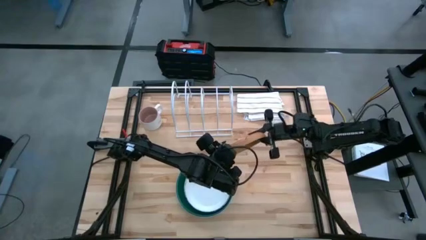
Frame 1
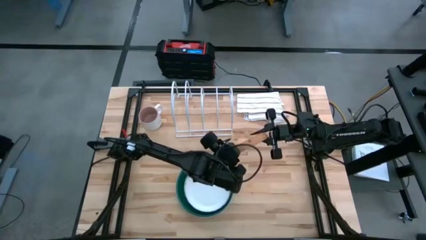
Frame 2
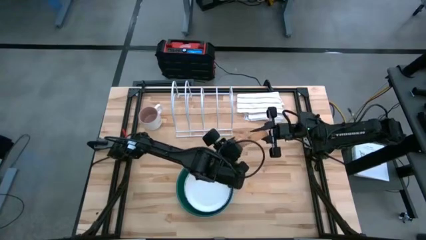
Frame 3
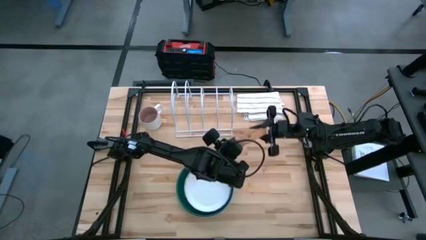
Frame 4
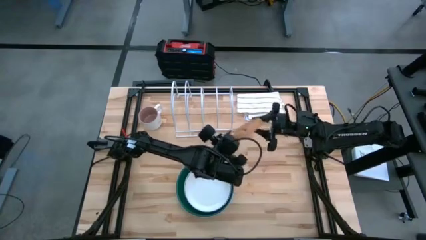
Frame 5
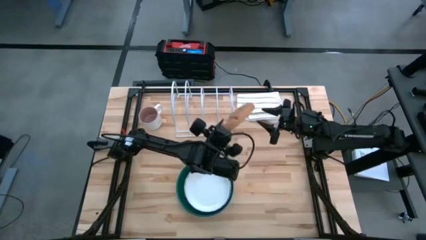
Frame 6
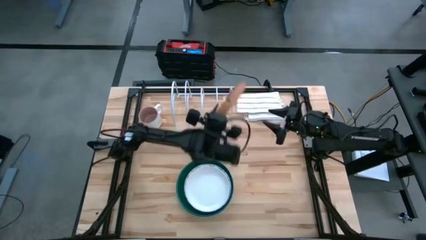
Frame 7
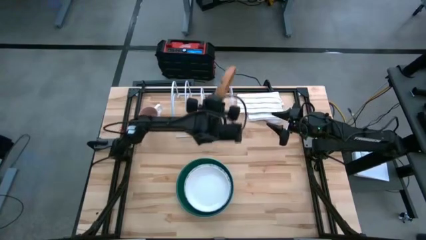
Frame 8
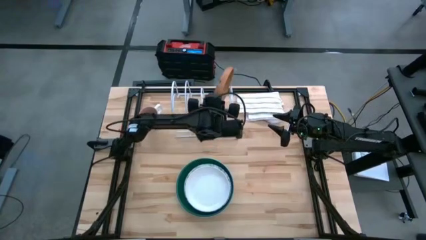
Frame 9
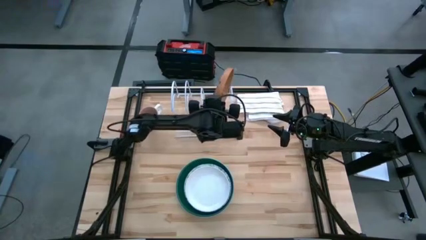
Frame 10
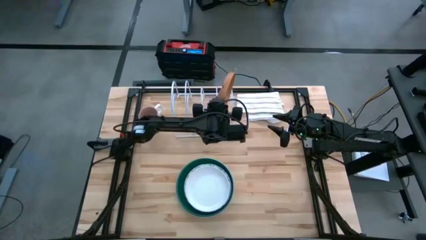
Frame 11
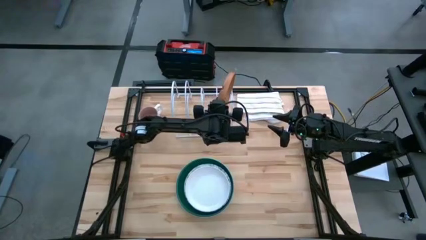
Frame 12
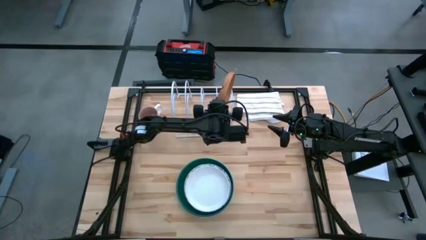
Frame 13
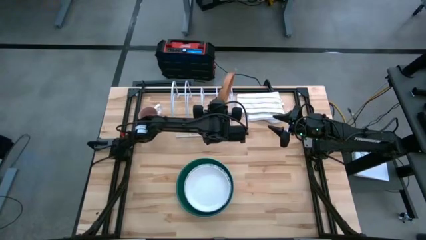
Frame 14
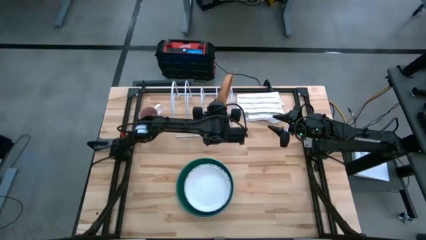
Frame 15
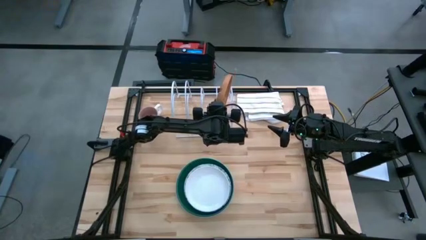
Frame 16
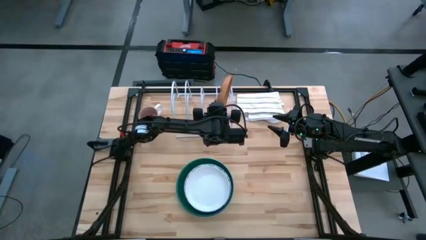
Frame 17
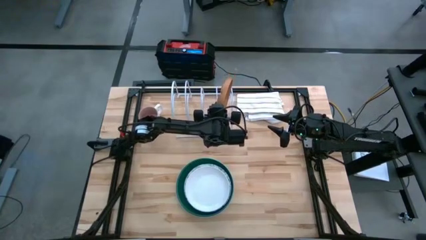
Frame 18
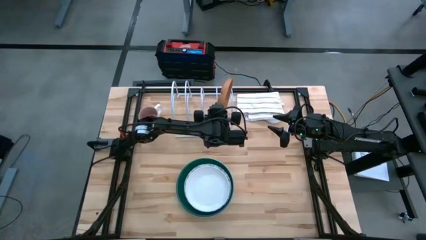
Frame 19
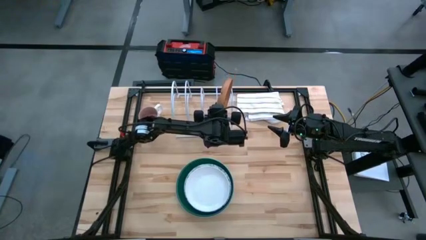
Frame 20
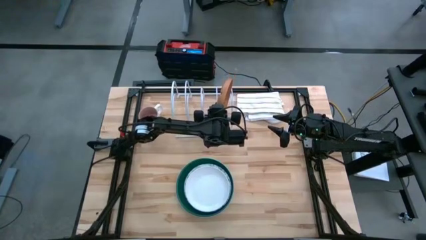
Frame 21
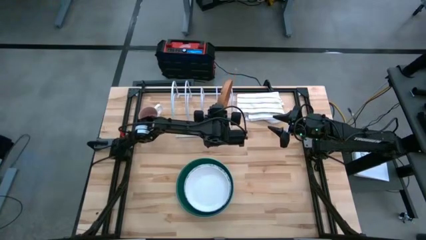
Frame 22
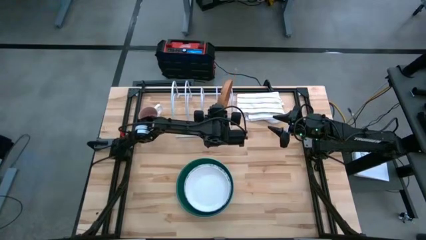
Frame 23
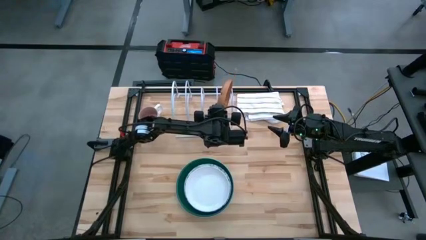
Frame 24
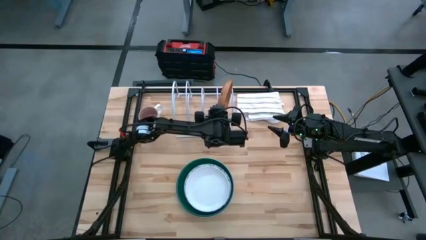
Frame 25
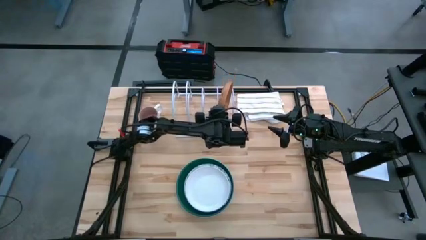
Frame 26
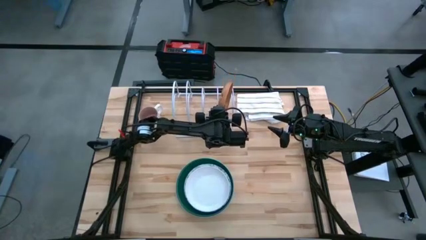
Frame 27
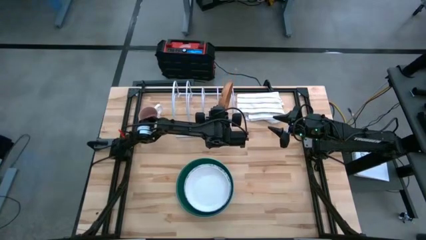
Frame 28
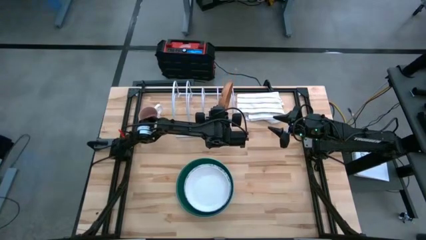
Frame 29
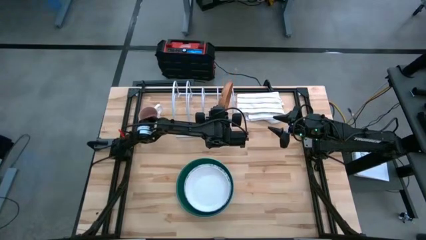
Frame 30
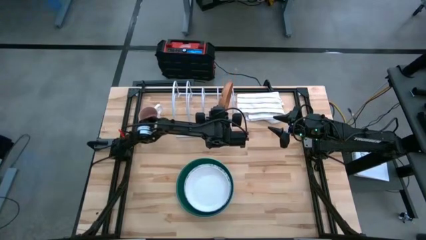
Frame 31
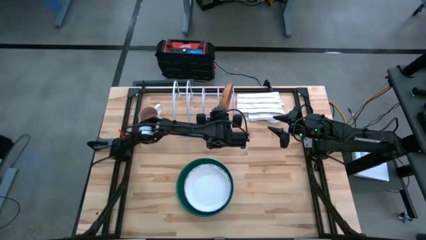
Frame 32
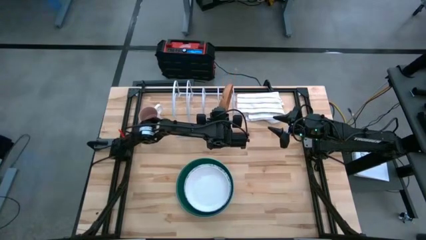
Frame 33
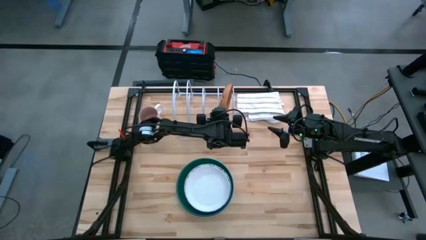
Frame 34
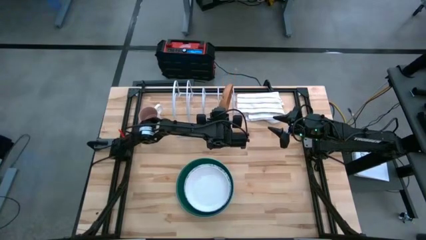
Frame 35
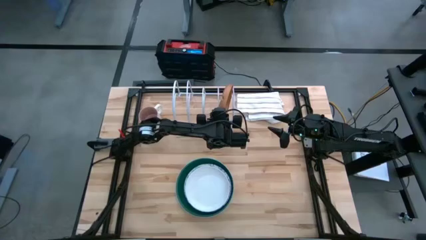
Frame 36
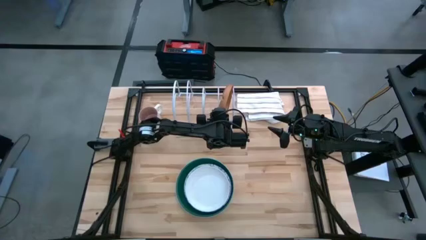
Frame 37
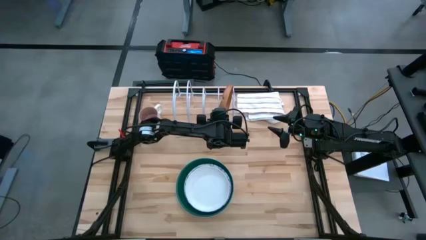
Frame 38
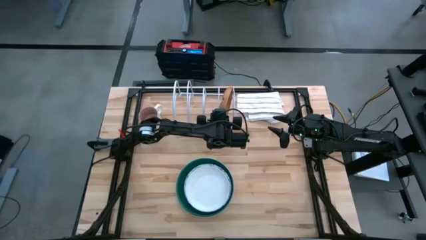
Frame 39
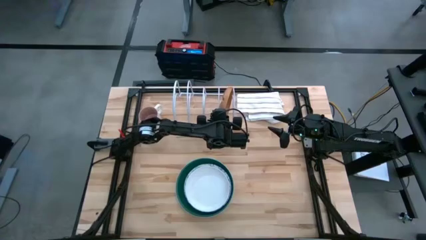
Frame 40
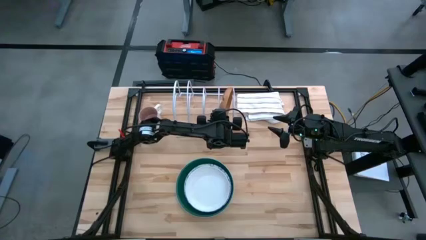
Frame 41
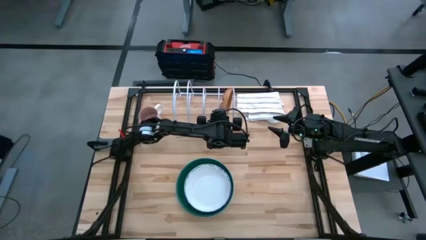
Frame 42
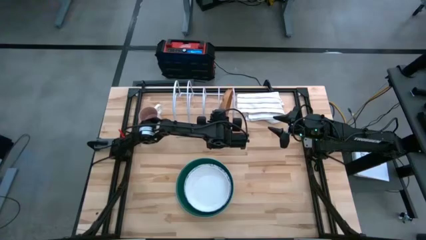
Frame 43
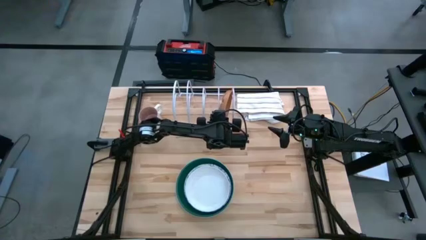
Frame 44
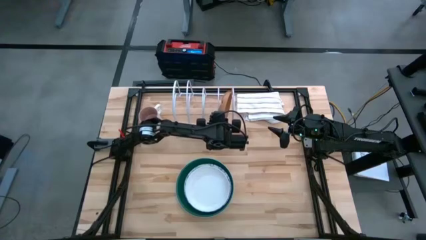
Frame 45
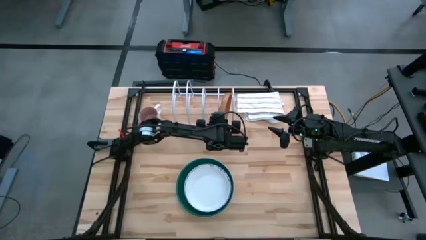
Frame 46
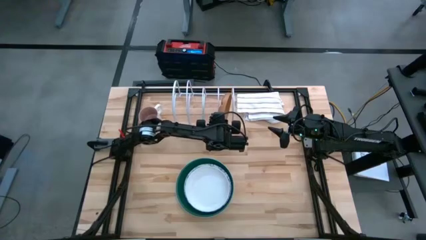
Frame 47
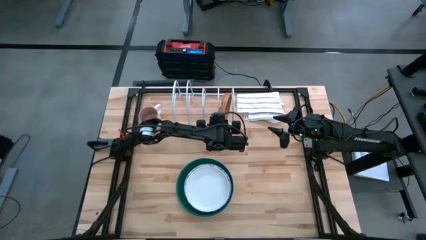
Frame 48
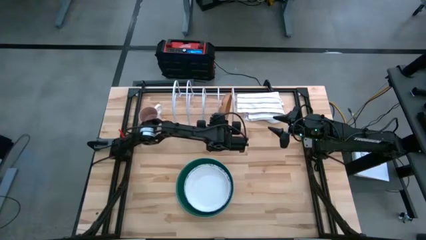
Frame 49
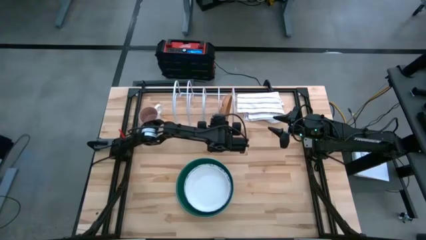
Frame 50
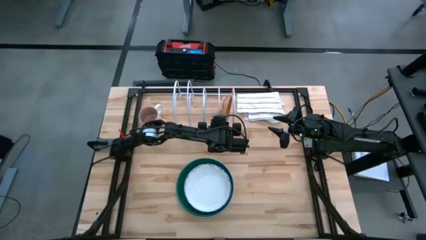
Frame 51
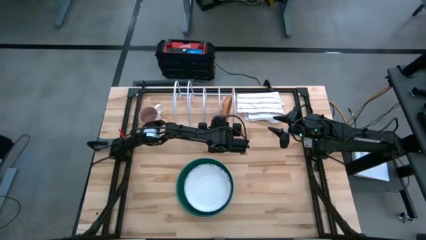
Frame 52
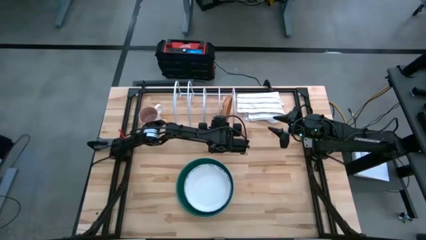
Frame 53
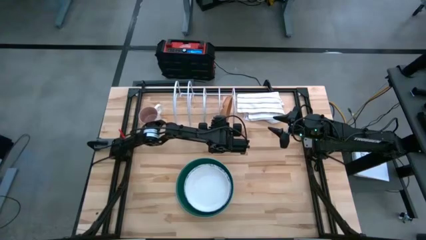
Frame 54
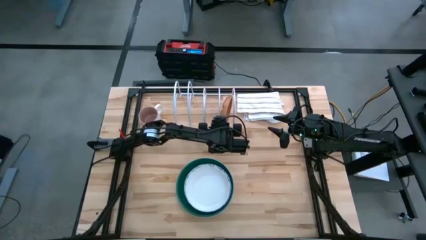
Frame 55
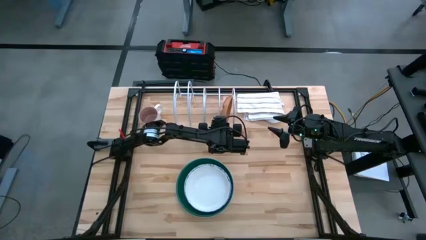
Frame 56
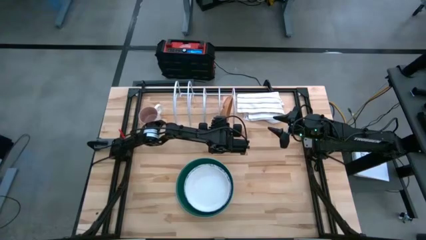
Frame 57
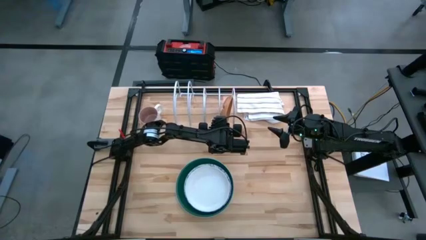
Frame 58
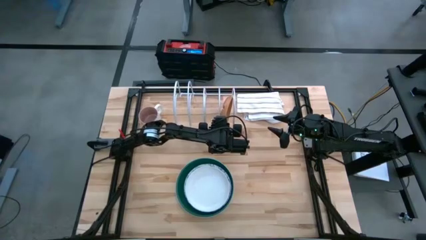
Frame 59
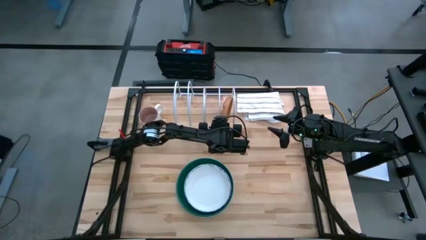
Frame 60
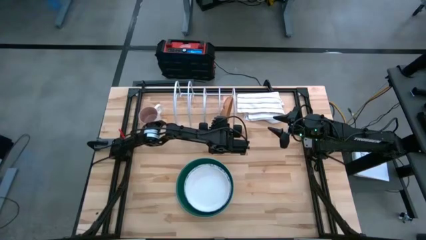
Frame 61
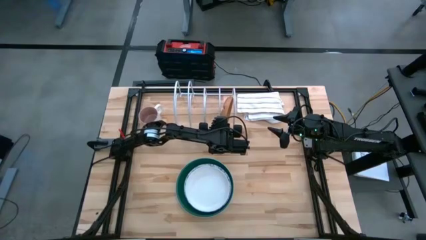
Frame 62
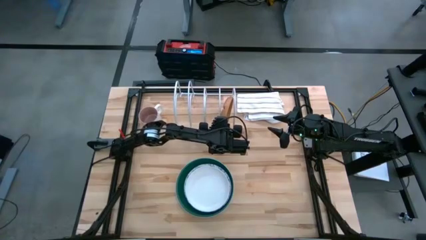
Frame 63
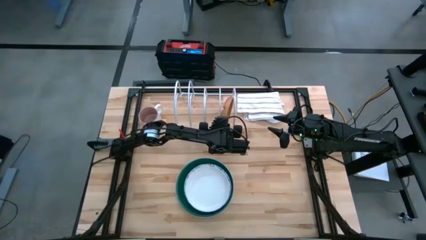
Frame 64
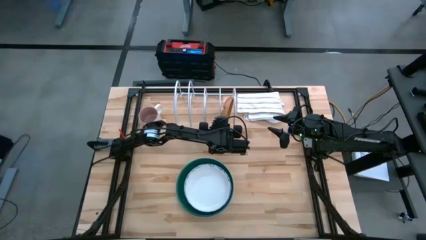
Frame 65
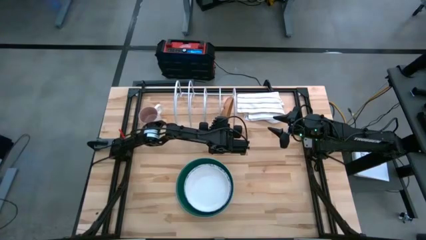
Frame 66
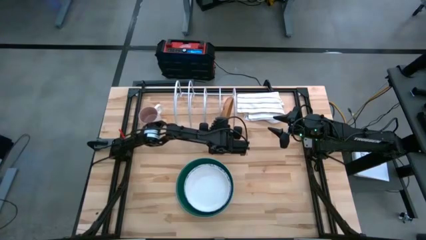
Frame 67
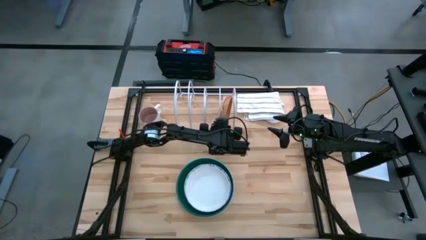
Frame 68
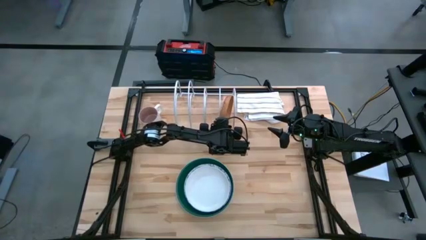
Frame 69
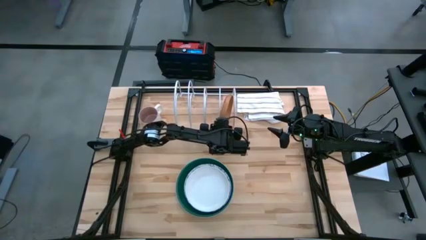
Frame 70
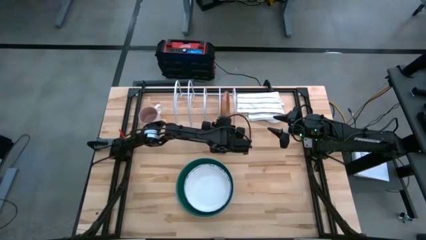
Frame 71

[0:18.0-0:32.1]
Task: Sort dishes
Put the brown plate into the dishwasher rack
